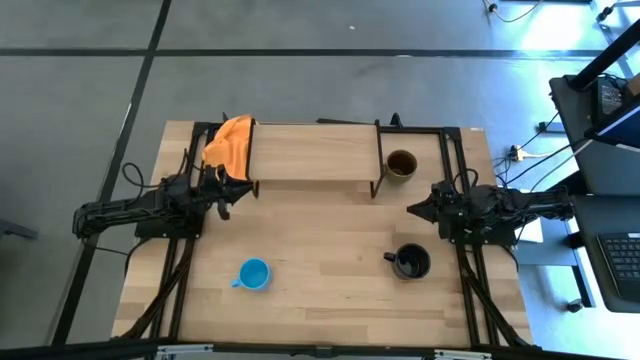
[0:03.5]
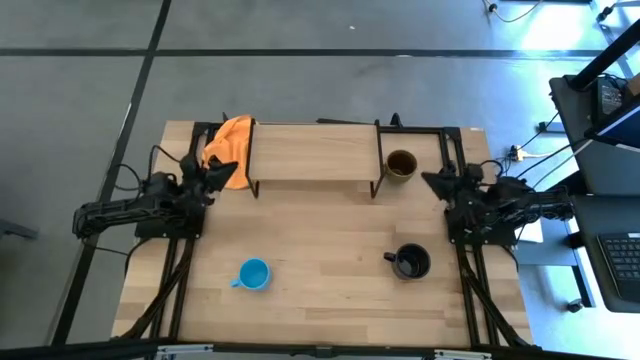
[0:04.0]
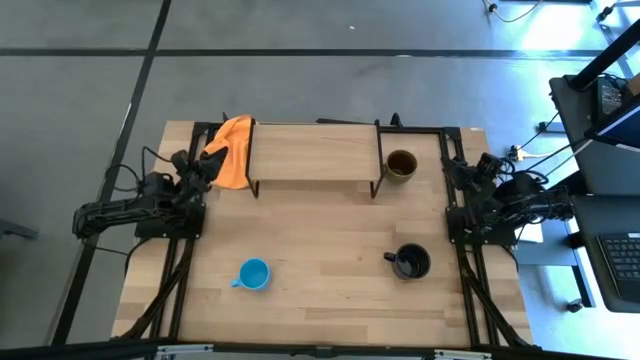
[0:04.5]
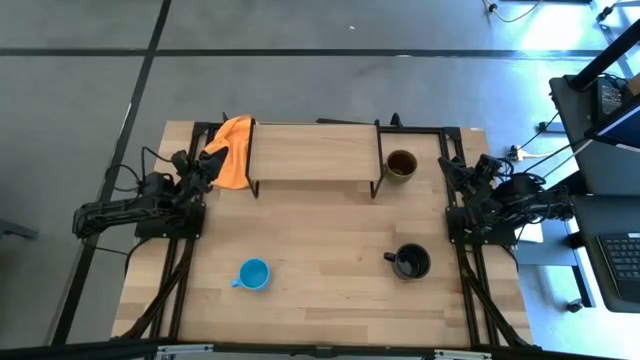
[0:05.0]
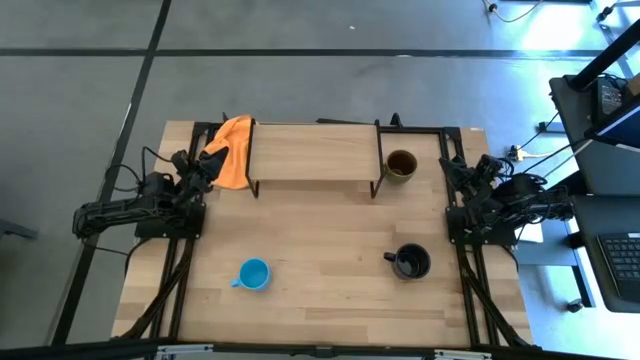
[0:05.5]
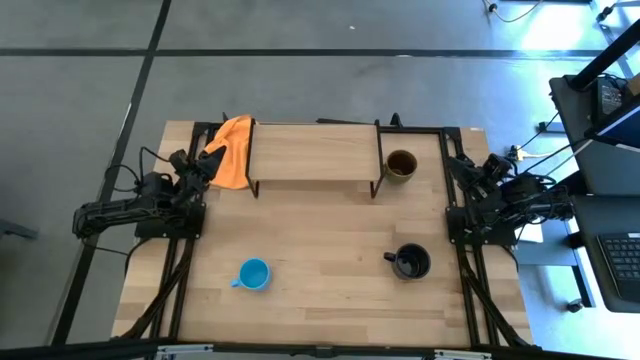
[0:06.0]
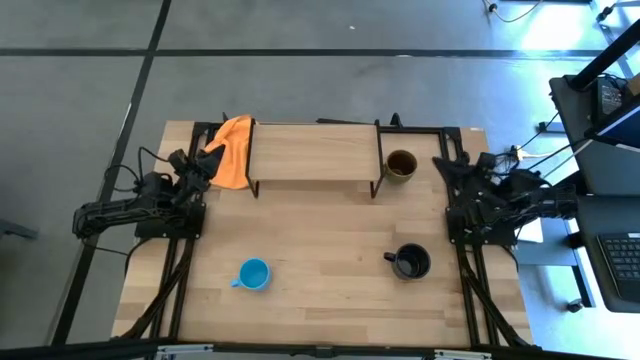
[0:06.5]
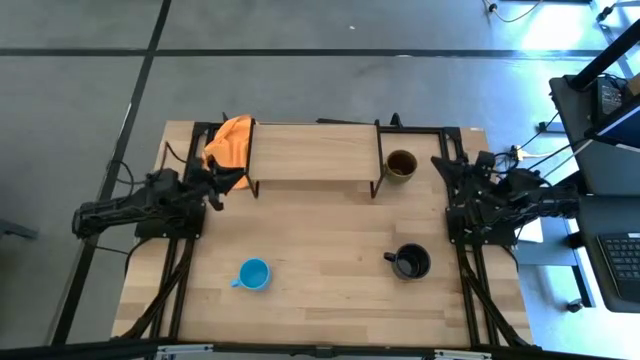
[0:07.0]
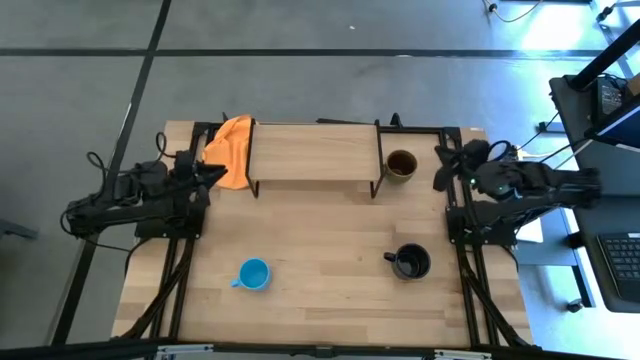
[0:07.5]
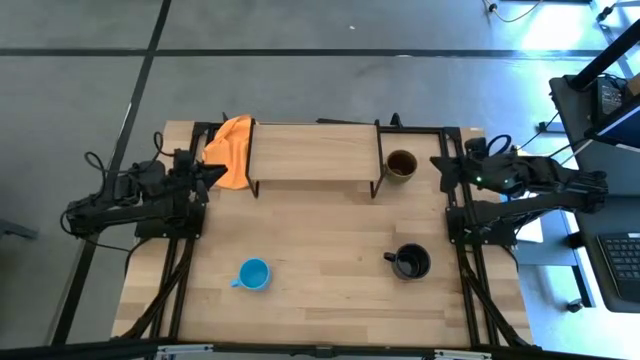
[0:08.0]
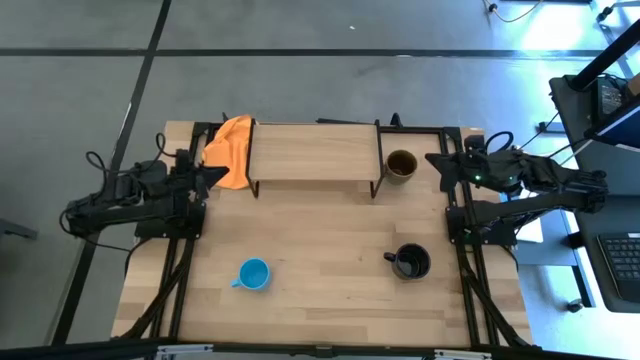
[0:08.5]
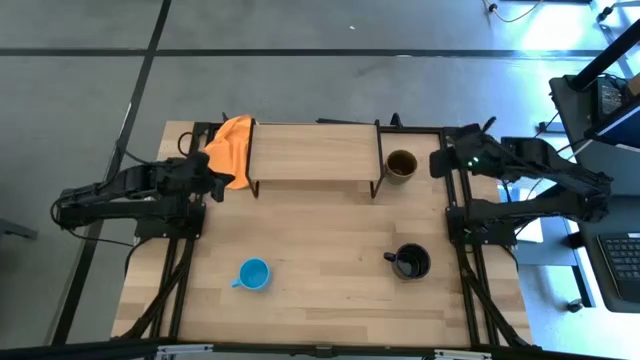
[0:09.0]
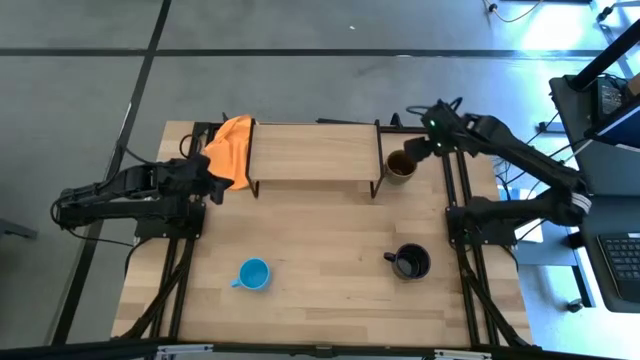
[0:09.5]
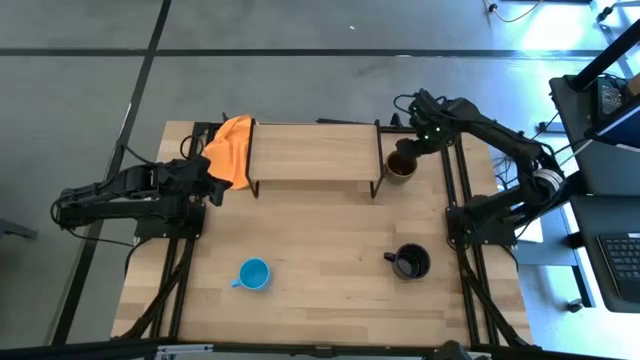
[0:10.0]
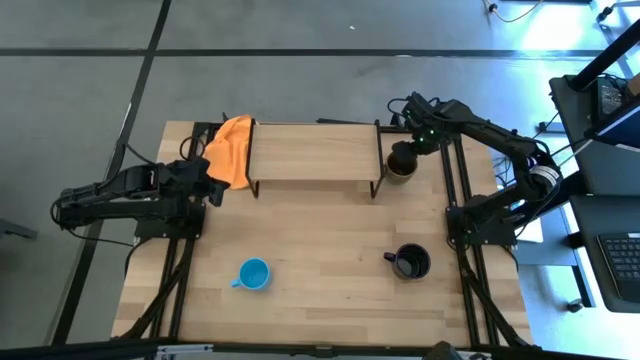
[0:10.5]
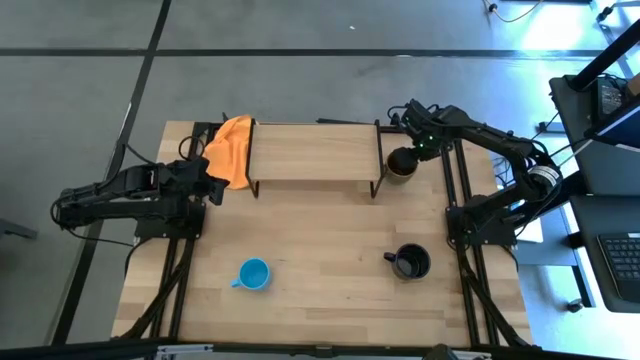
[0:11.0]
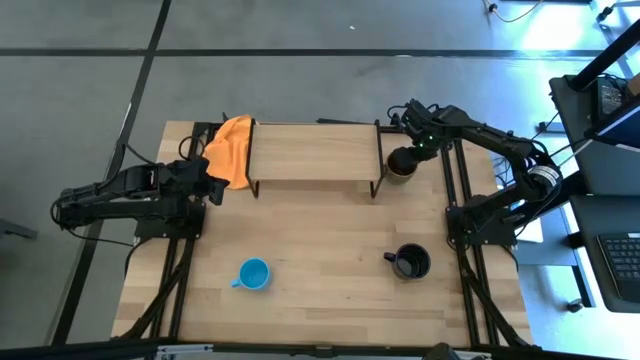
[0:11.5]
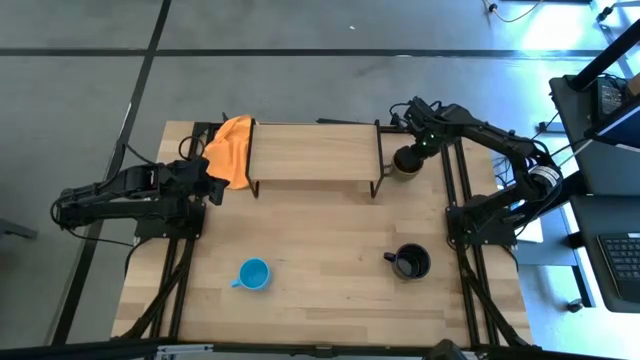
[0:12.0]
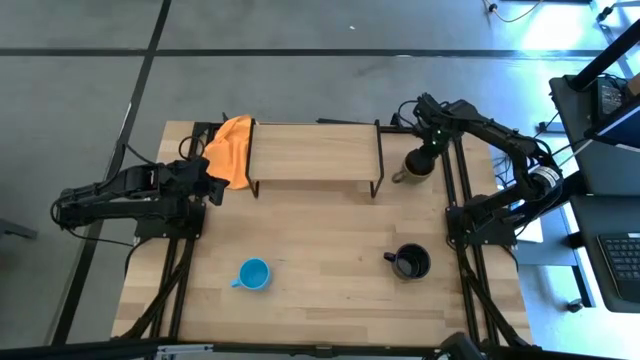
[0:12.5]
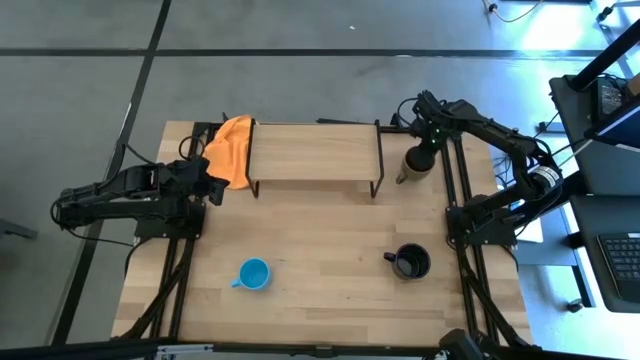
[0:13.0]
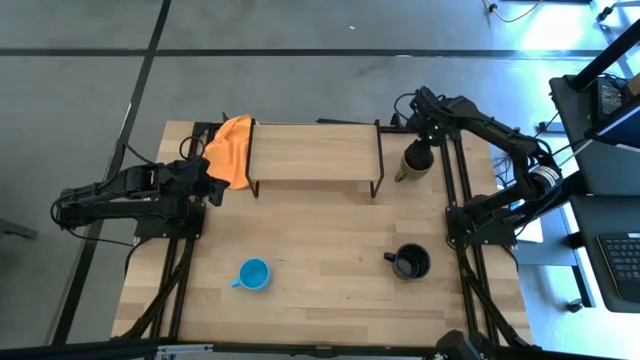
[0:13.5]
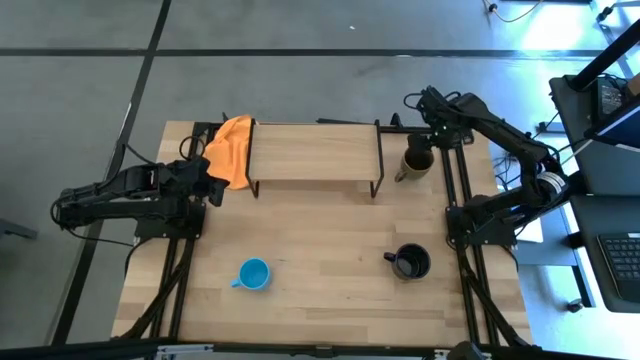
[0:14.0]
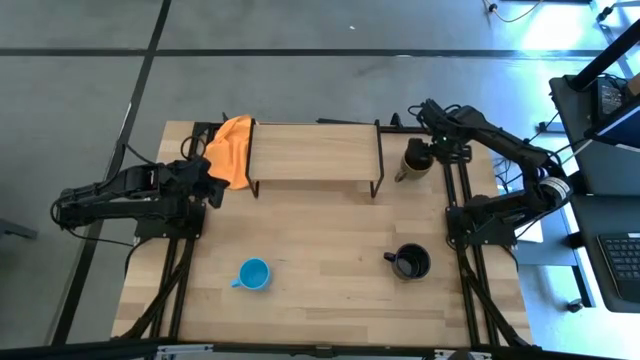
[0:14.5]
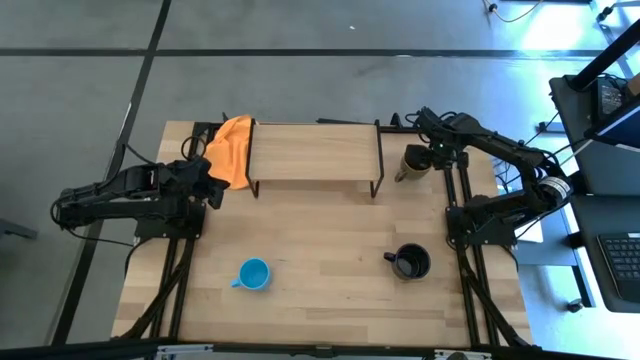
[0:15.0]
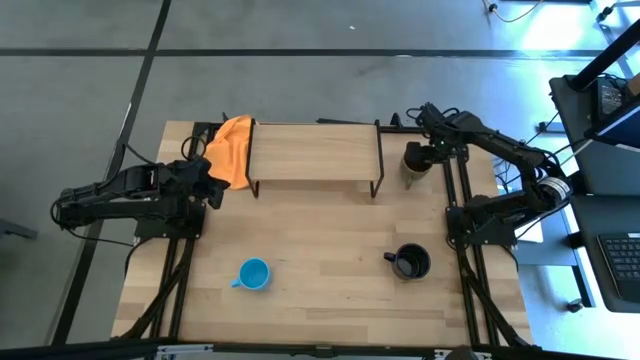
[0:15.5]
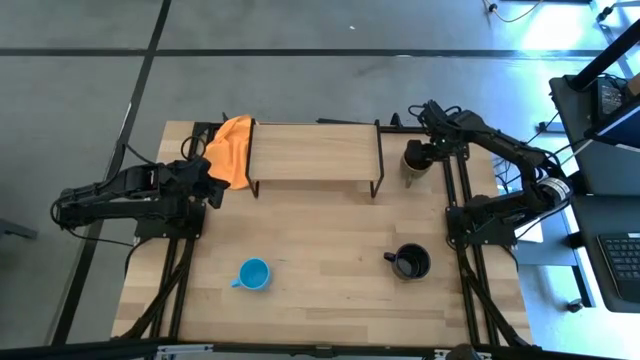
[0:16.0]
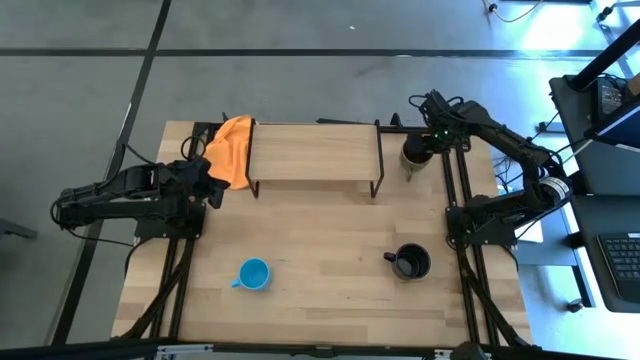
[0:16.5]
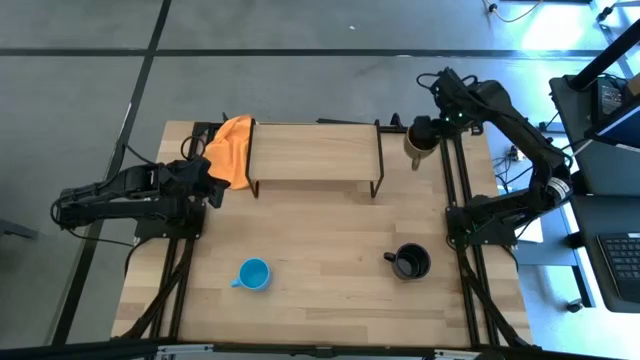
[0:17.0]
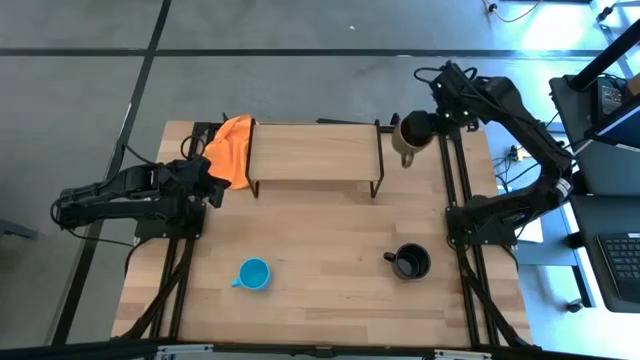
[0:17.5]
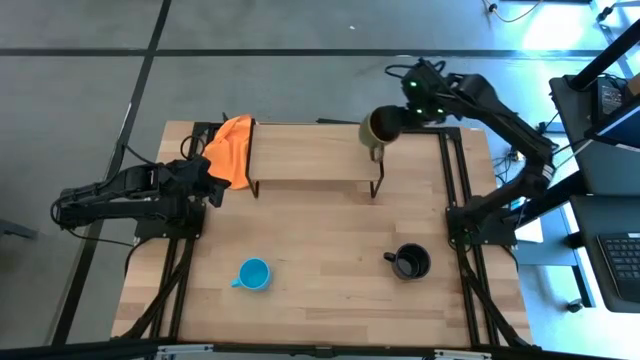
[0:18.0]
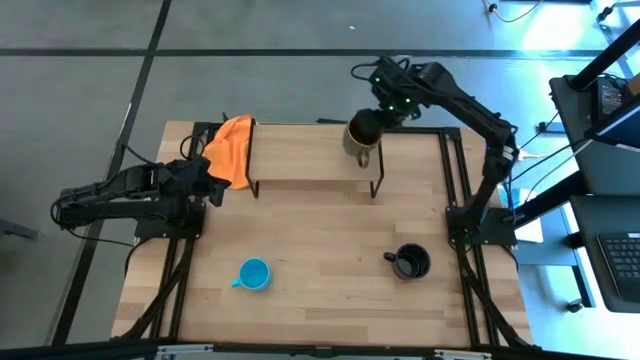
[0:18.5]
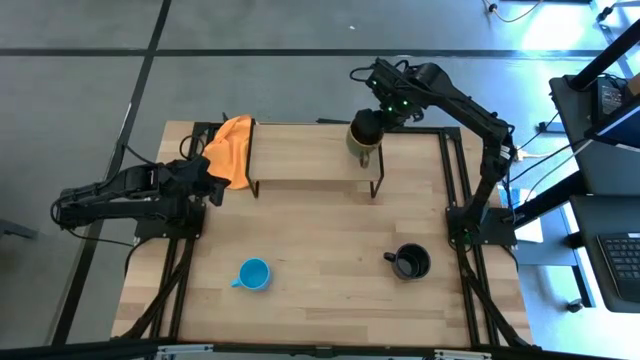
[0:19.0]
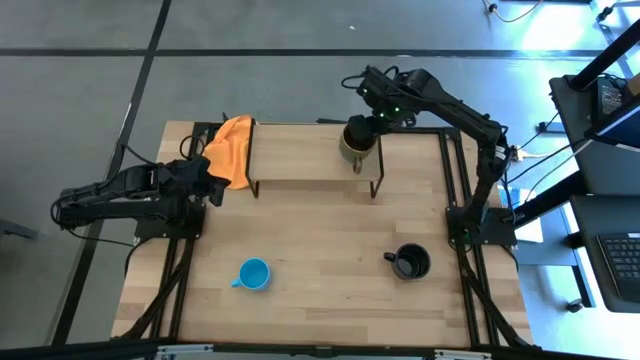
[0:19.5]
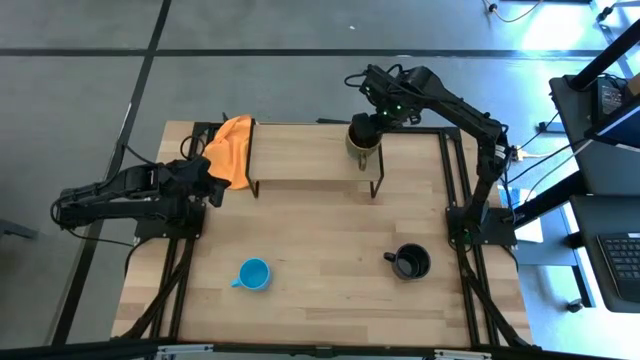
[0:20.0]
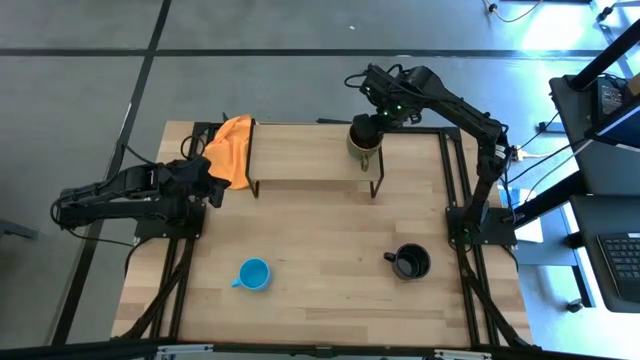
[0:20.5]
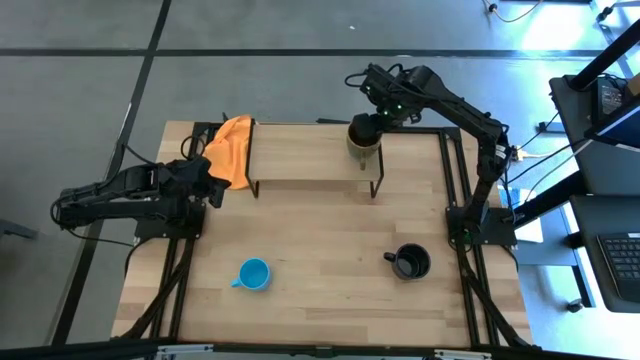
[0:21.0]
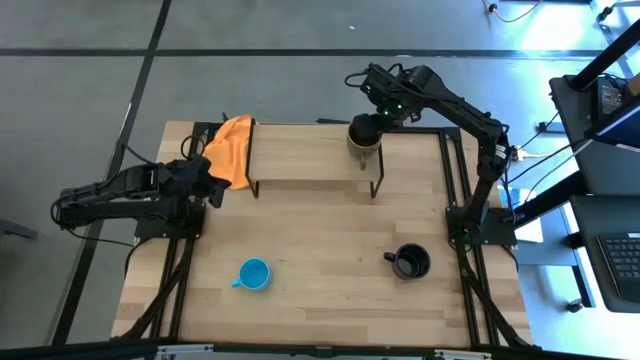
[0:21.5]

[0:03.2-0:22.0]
Task: Stack small to large cups/mugs on shelf
Put the brown mug on the shelf
